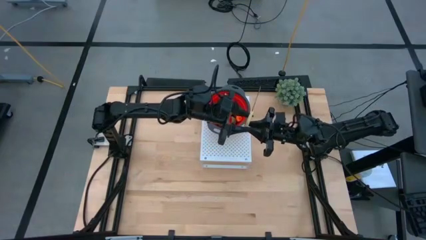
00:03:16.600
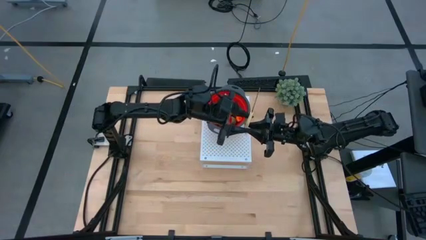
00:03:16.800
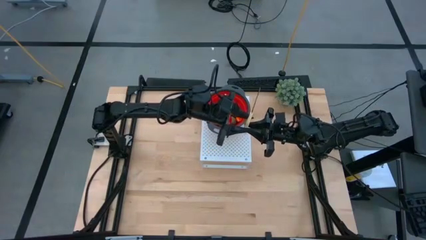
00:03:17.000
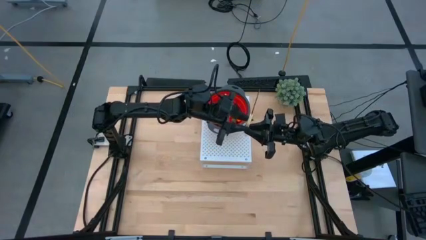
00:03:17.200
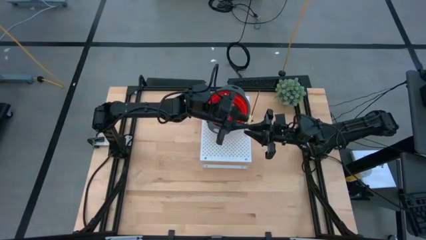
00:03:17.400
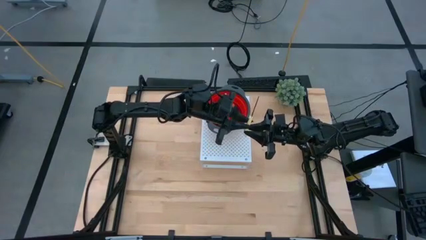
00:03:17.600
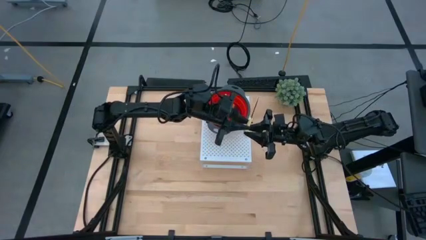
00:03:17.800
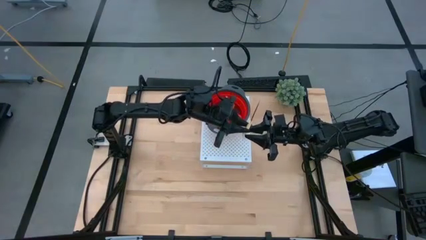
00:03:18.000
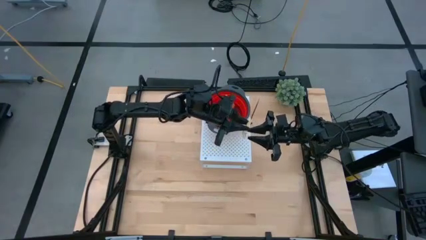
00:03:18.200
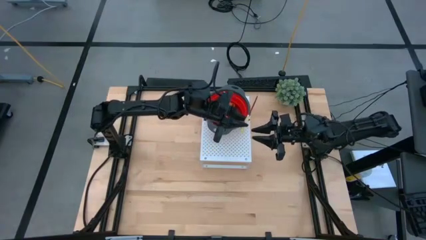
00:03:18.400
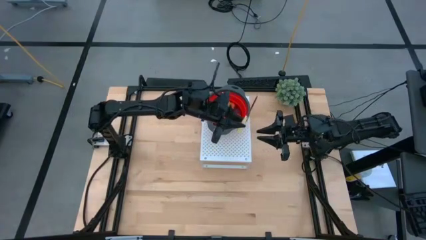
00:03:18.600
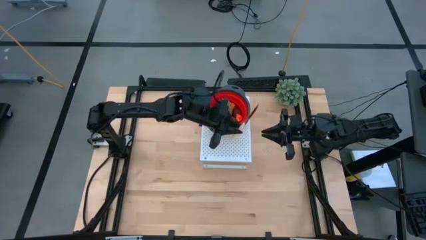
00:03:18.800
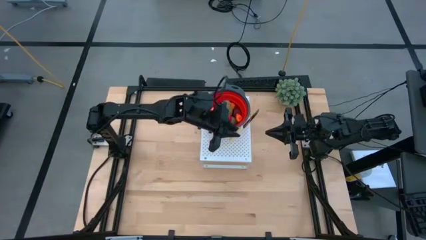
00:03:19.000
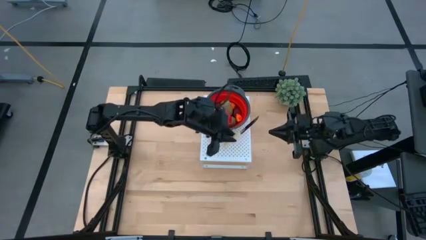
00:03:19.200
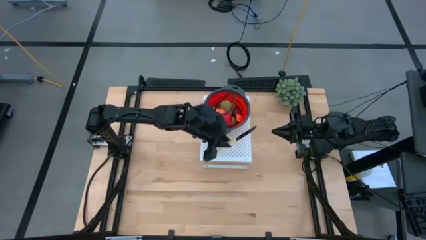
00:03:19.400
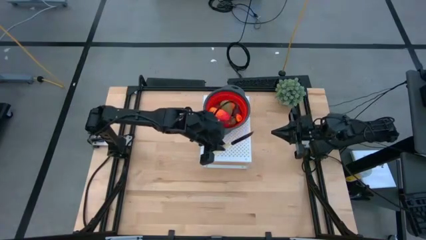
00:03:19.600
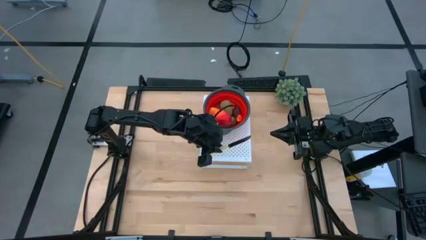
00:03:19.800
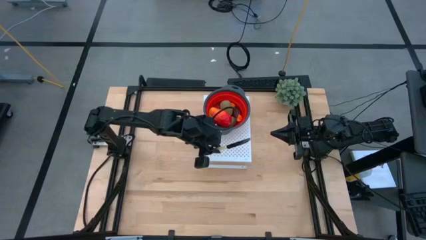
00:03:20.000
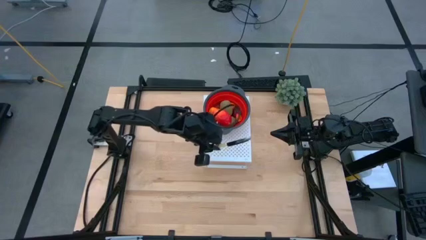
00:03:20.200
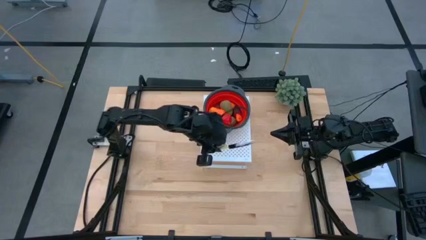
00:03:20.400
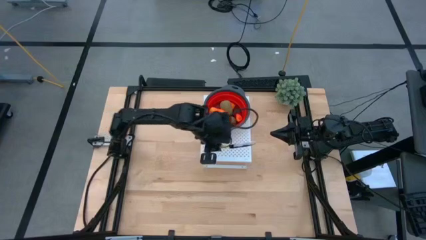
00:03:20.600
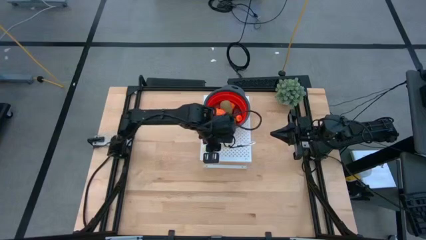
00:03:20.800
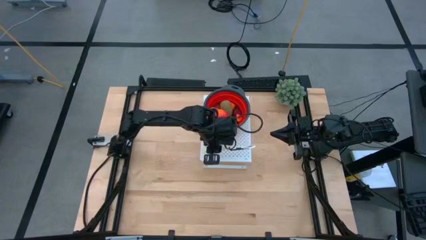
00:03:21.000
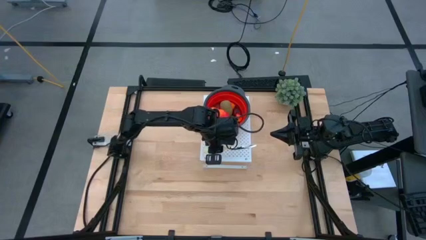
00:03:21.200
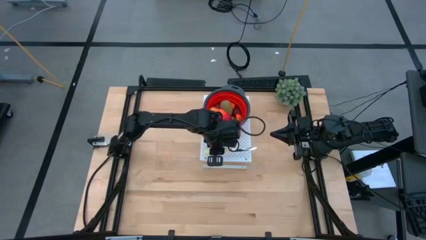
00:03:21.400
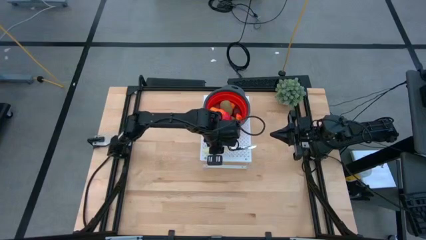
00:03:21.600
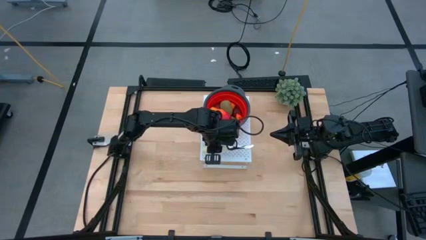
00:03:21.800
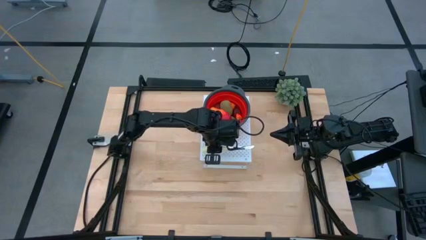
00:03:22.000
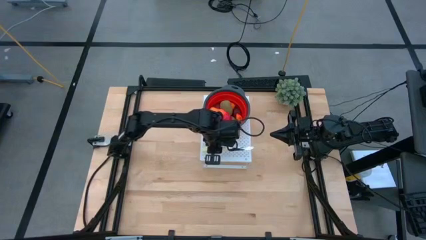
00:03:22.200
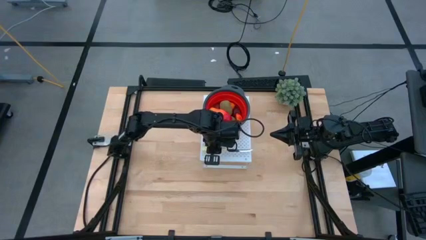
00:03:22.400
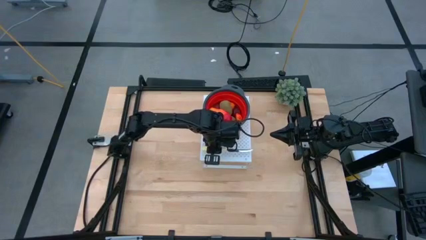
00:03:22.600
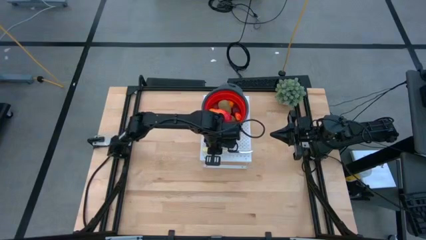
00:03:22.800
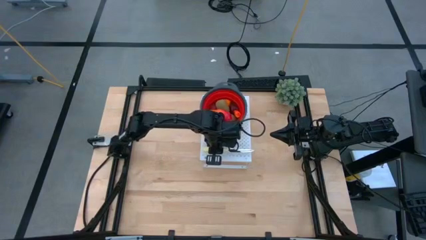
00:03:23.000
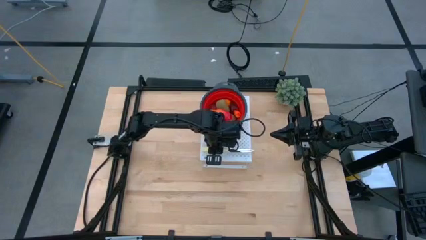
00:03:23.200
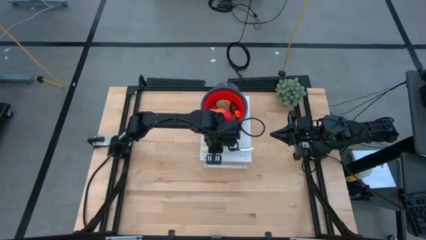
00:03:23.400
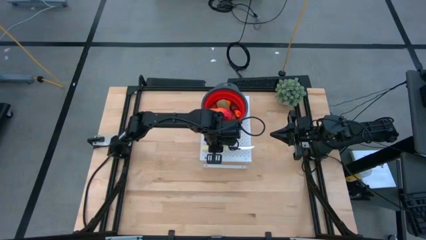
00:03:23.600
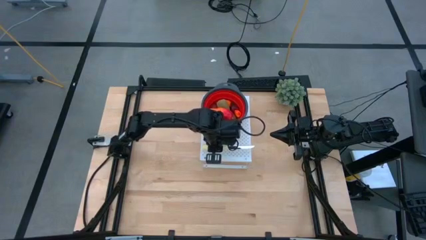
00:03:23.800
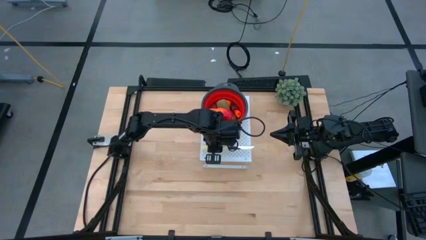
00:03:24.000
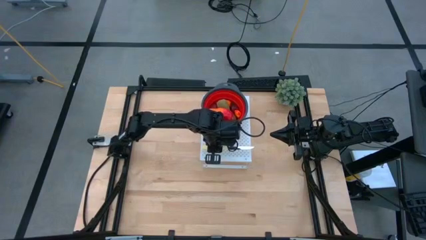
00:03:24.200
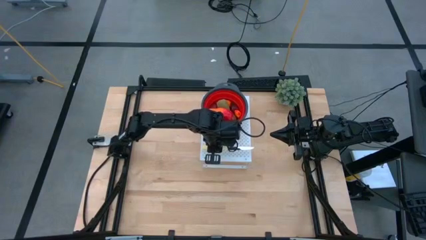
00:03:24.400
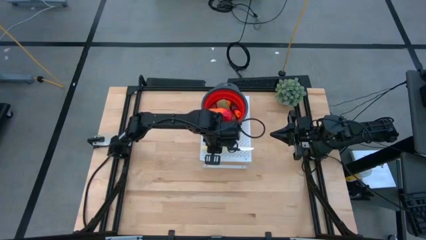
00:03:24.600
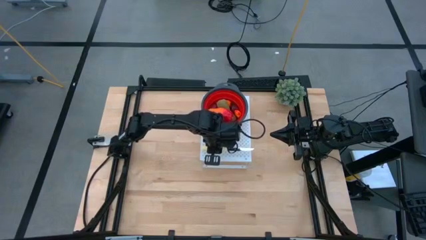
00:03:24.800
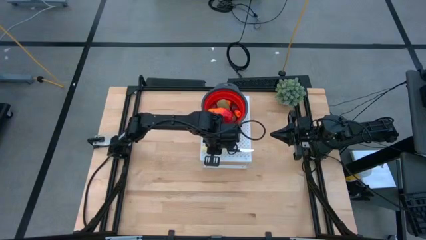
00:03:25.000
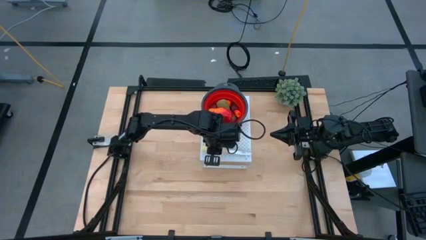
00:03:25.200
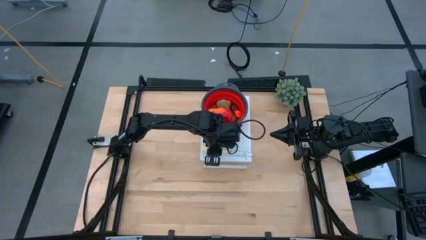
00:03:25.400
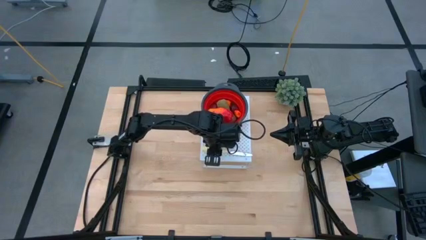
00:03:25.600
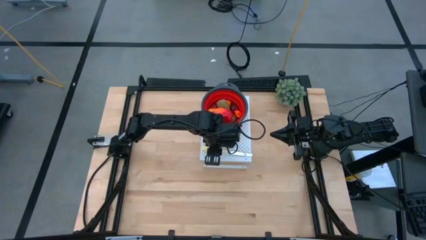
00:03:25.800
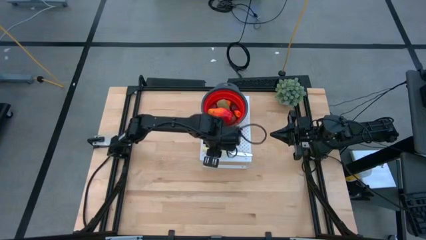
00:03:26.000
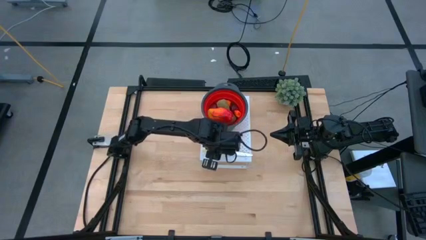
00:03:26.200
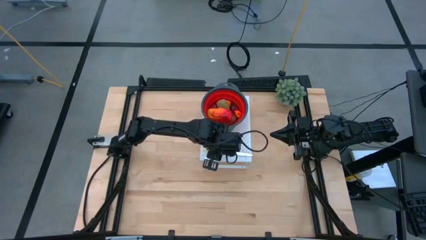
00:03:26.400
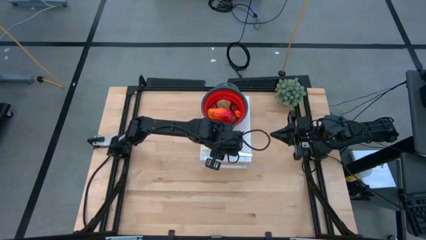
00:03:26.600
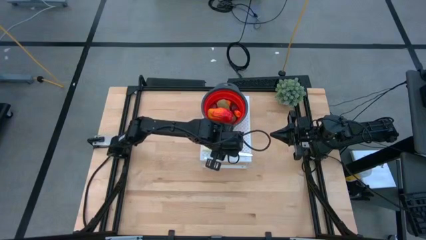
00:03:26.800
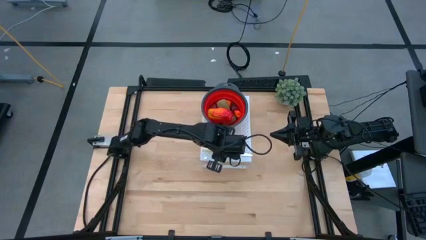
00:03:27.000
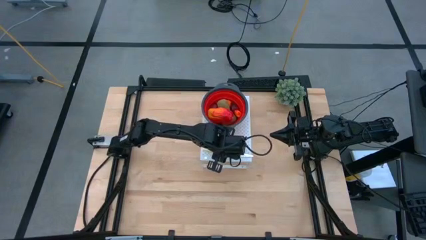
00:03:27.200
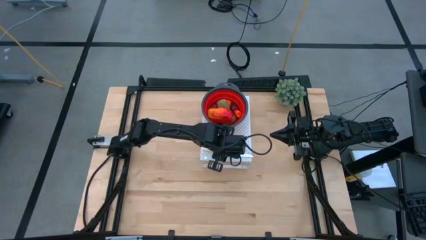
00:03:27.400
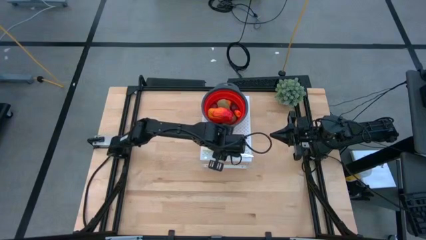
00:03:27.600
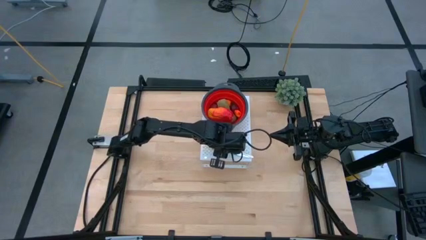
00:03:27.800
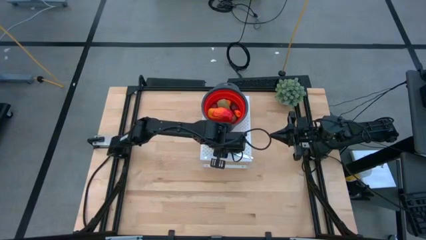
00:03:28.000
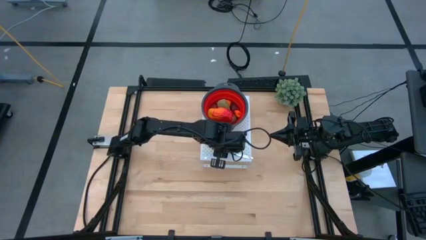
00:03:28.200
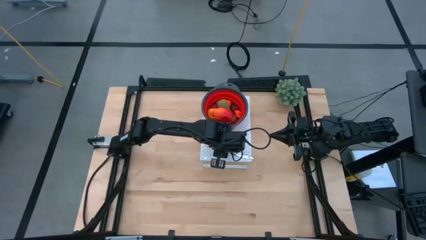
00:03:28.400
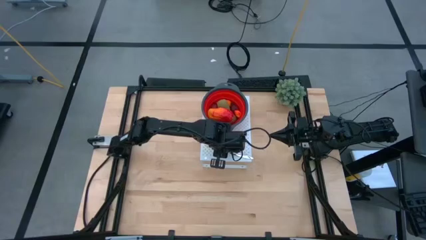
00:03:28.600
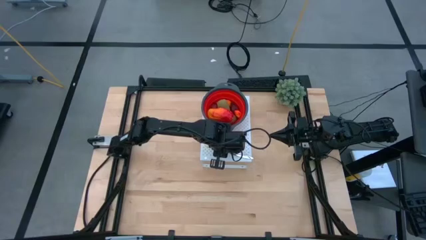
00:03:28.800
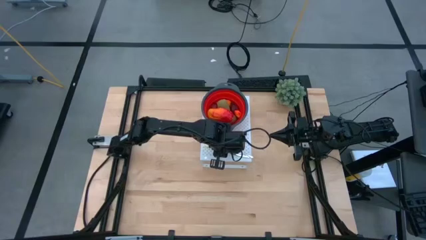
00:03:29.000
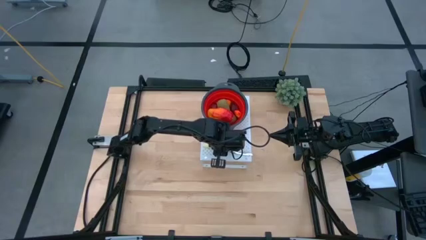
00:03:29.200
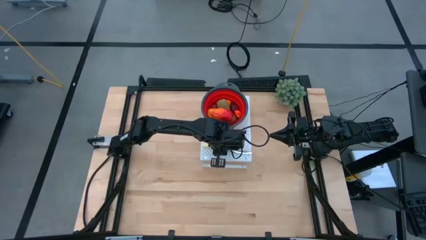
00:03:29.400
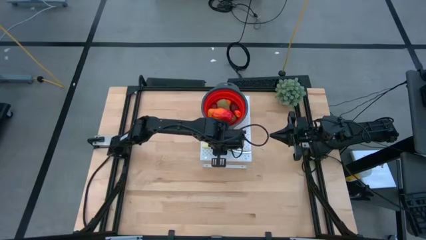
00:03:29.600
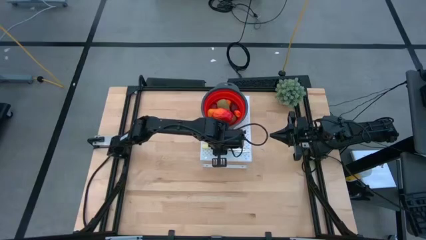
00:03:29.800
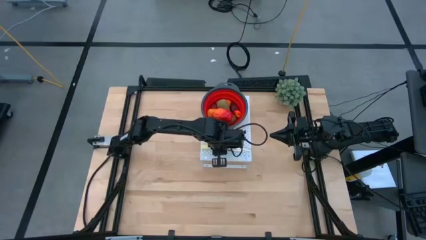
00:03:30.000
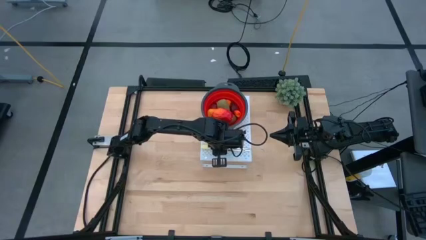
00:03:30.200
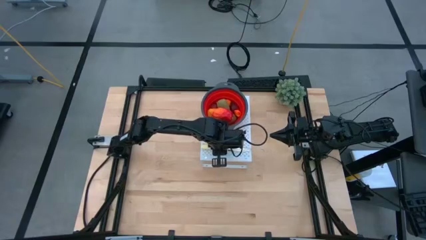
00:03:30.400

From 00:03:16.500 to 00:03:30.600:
Task: Pick & Place Fruit
Put the yellow knife on the shelf

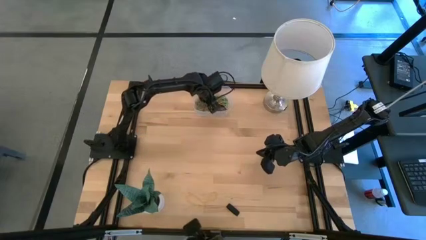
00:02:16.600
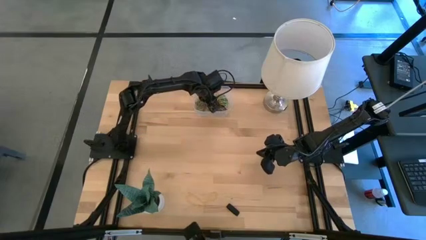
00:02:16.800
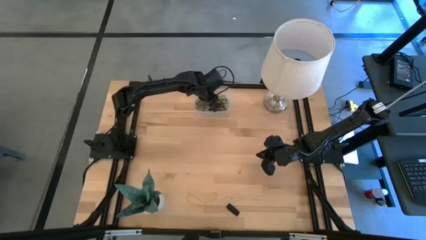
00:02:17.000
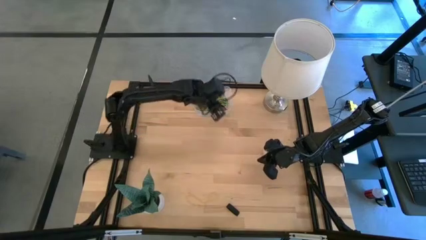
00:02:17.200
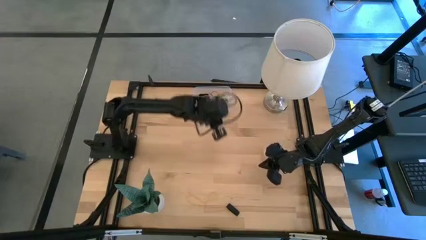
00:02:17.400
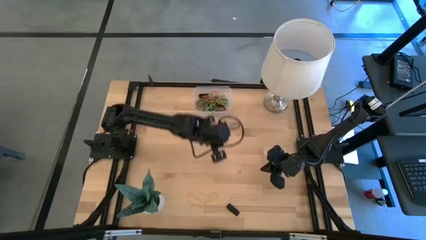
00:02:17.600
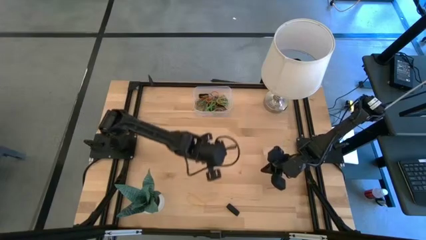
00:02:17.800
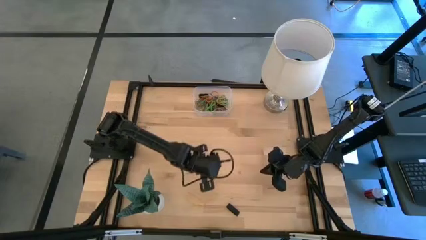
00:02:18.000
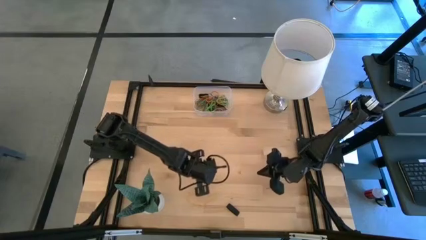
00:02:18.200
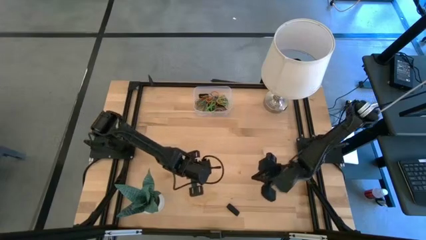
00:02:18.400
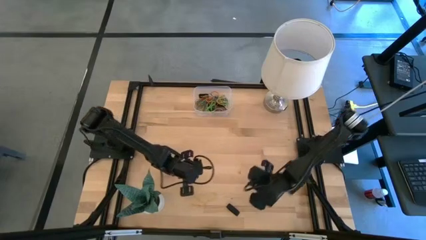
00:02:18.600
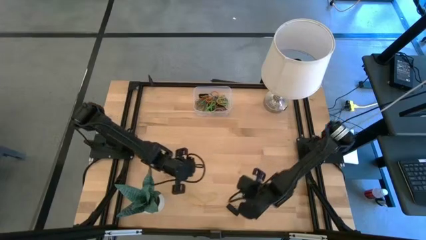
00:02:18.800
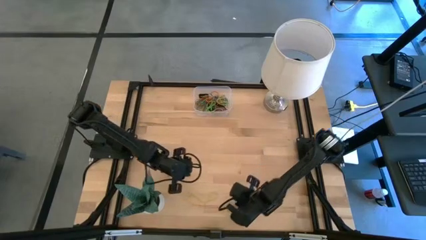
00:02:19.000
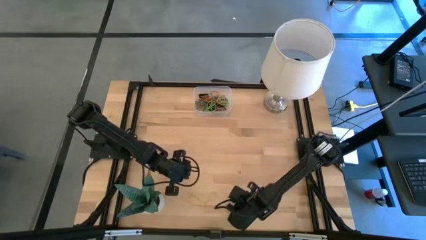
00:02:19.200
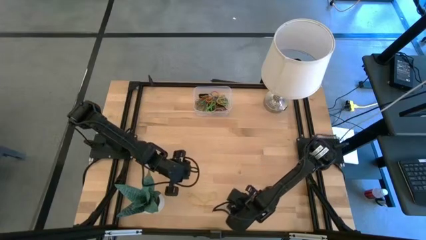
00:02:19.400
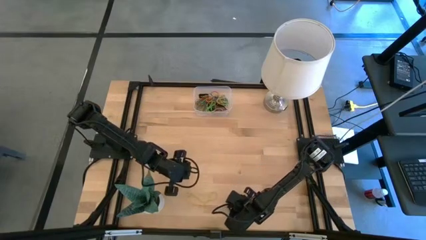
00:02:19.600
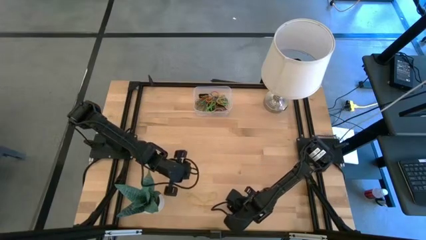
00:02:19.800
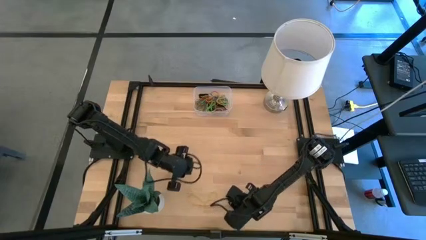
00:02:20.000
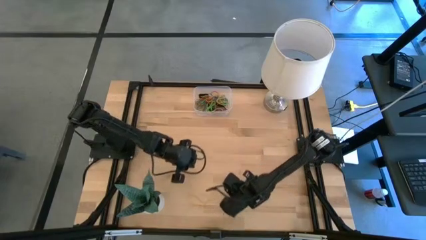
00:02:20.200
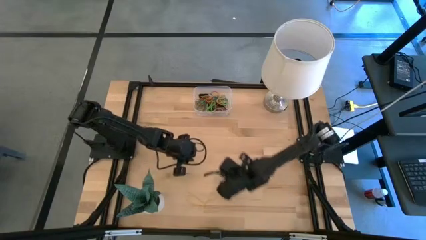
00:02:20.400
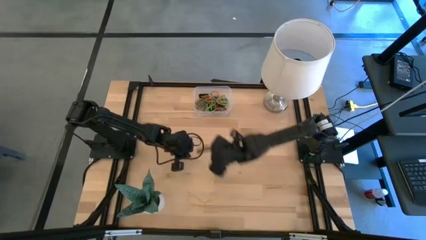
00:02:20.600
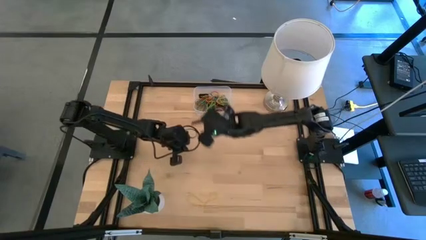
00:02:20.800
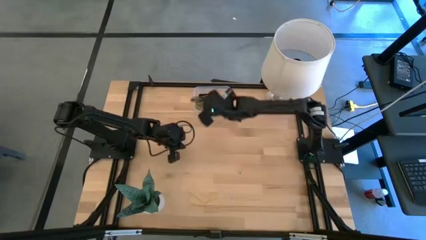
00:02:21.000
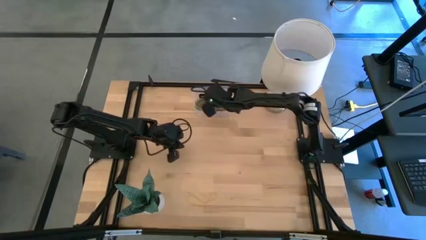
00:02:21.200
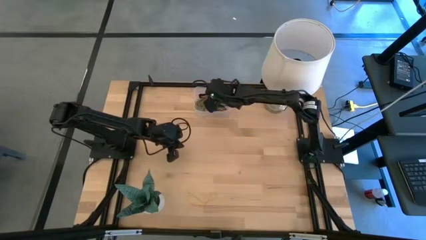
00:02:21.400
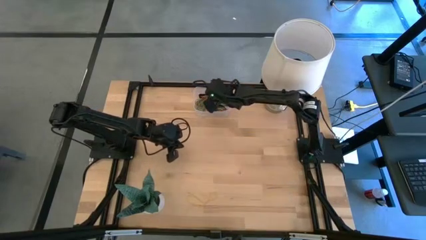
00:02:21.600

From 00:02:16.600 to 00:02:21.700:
Task: Pick and place rubber bands into bin
Put the black rubber band into the transparent bin
